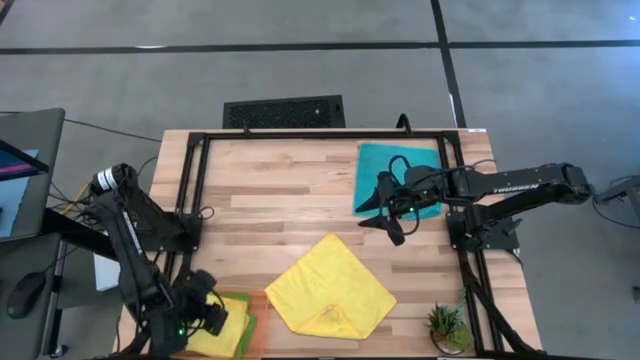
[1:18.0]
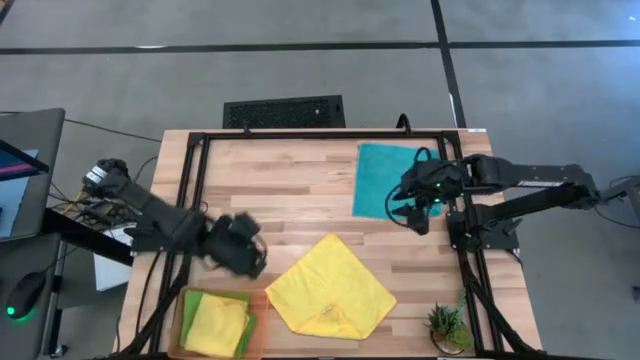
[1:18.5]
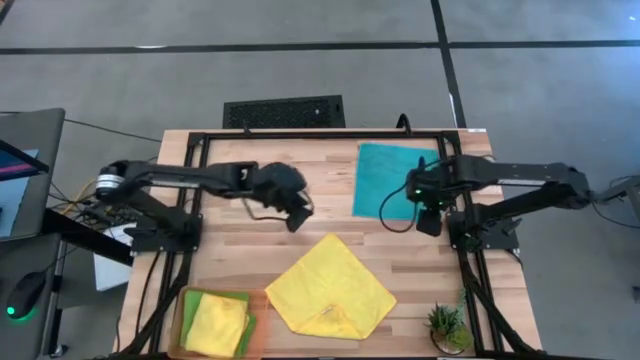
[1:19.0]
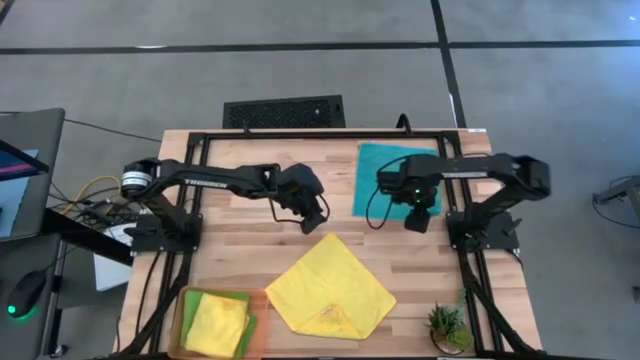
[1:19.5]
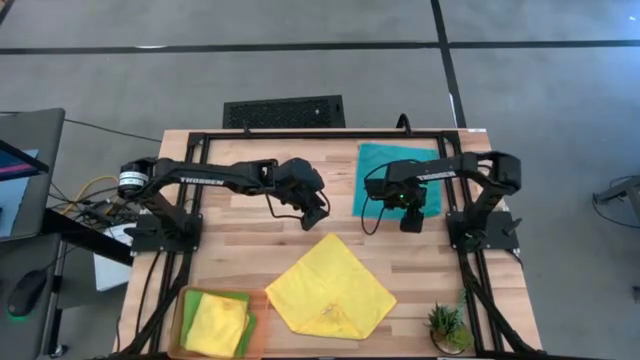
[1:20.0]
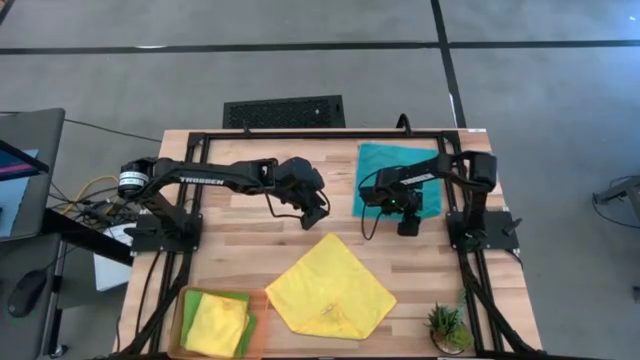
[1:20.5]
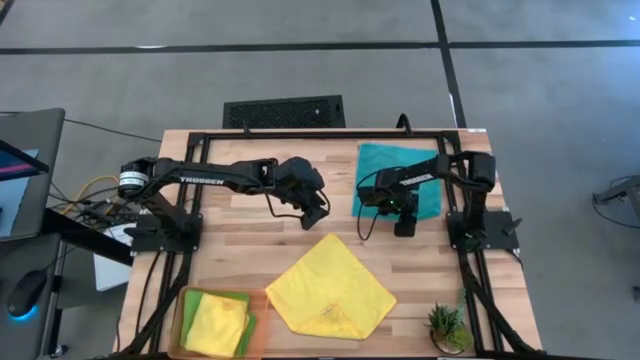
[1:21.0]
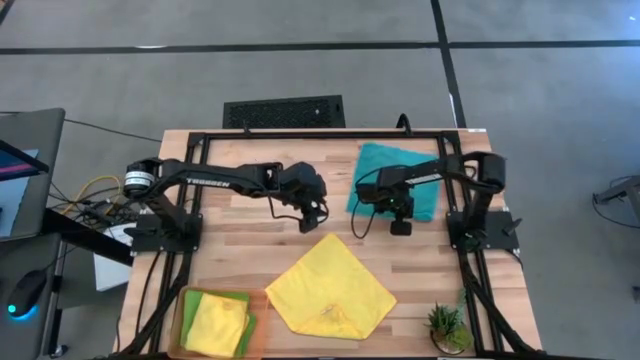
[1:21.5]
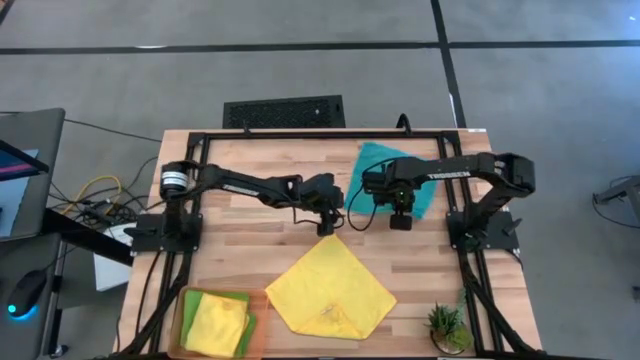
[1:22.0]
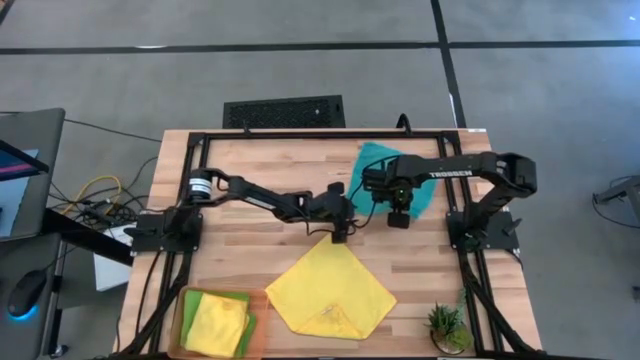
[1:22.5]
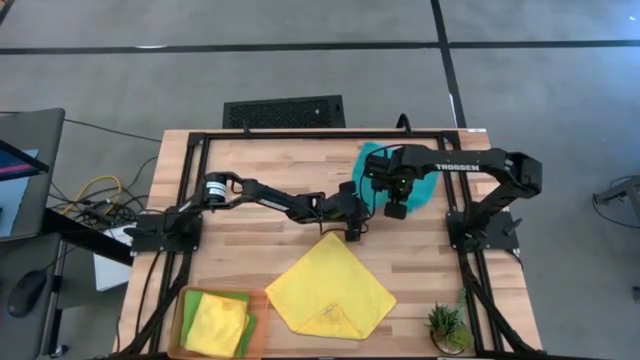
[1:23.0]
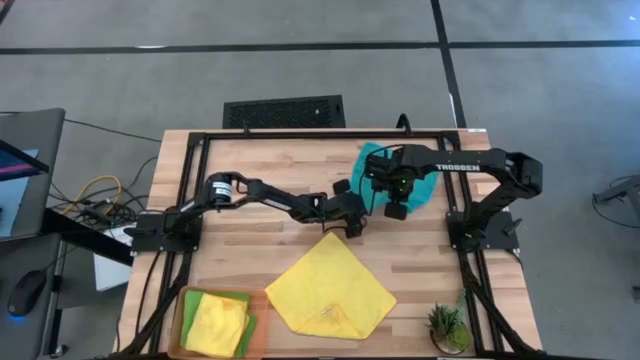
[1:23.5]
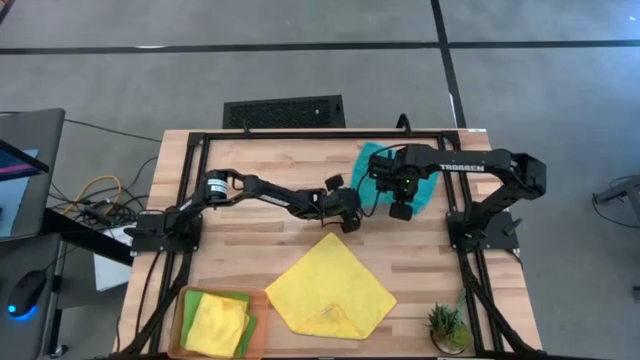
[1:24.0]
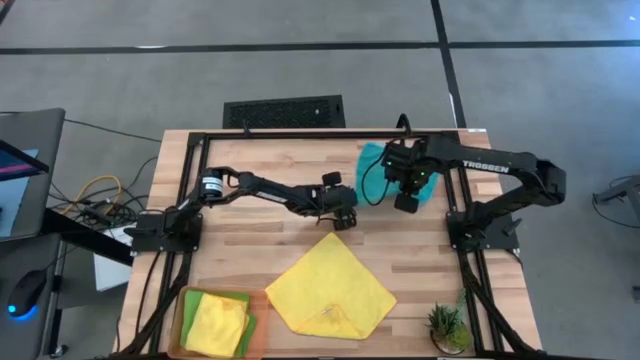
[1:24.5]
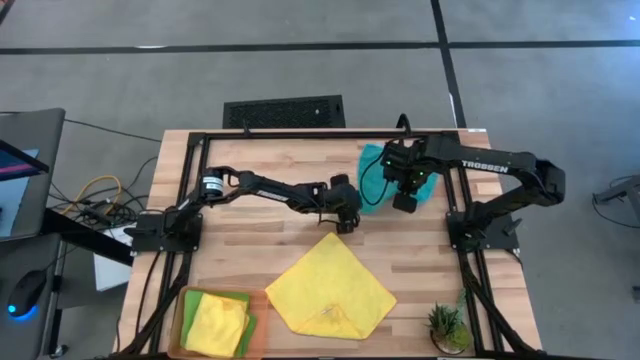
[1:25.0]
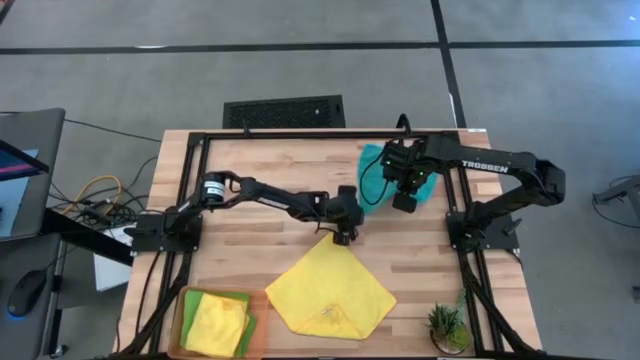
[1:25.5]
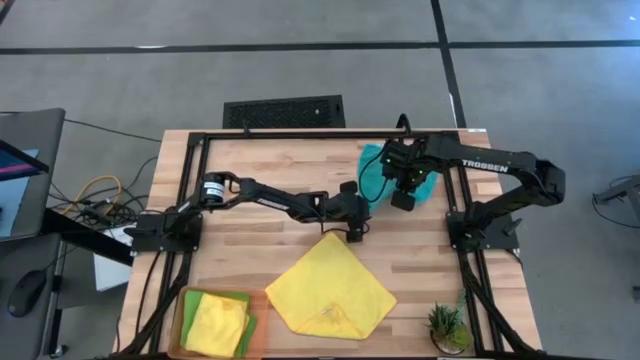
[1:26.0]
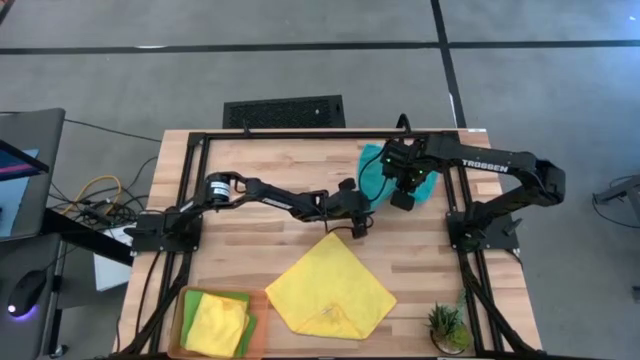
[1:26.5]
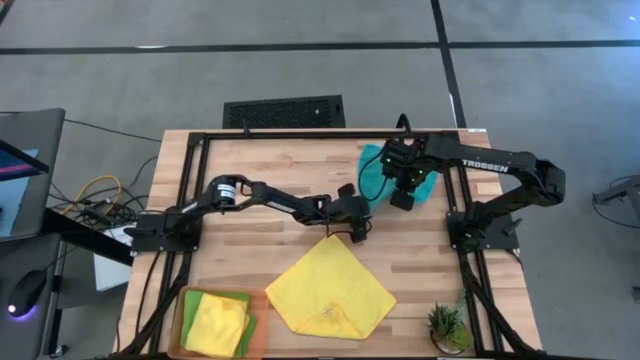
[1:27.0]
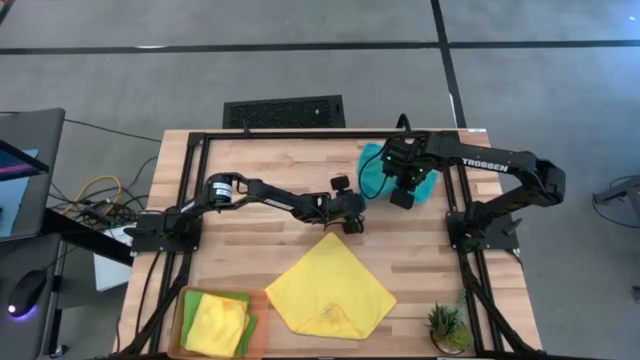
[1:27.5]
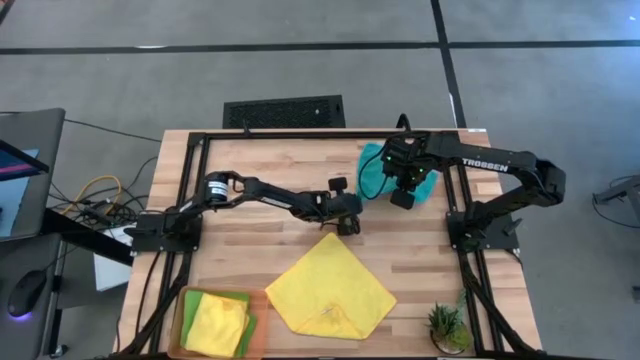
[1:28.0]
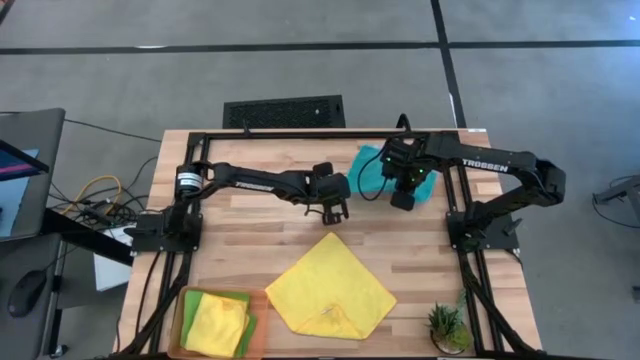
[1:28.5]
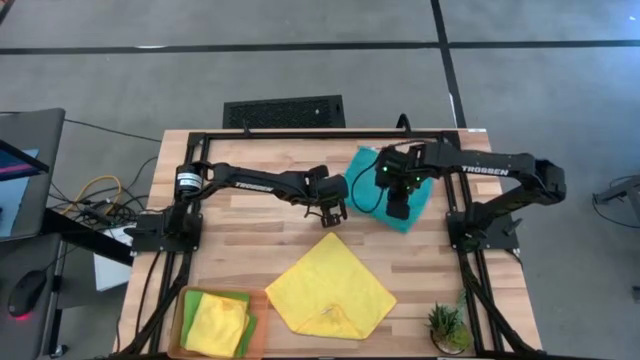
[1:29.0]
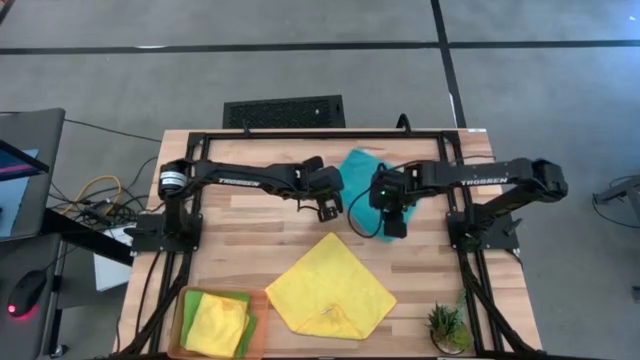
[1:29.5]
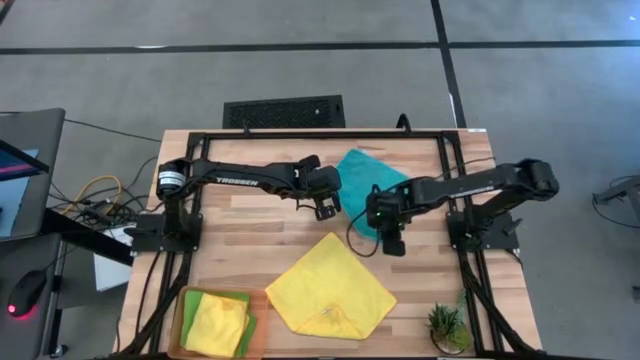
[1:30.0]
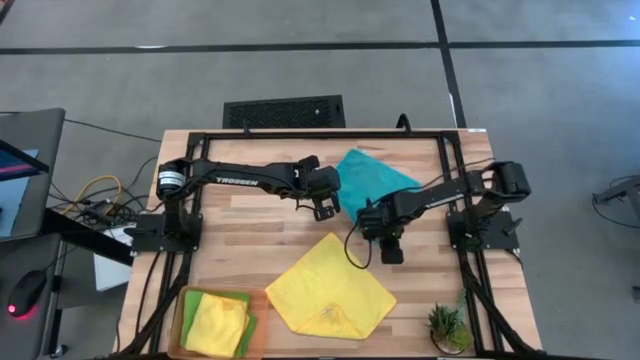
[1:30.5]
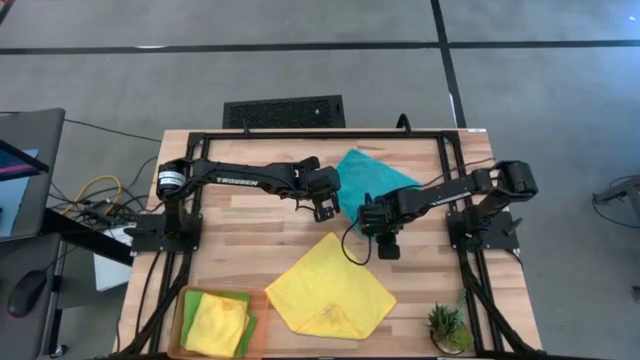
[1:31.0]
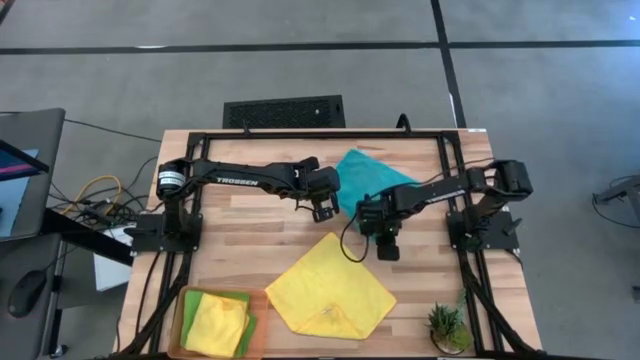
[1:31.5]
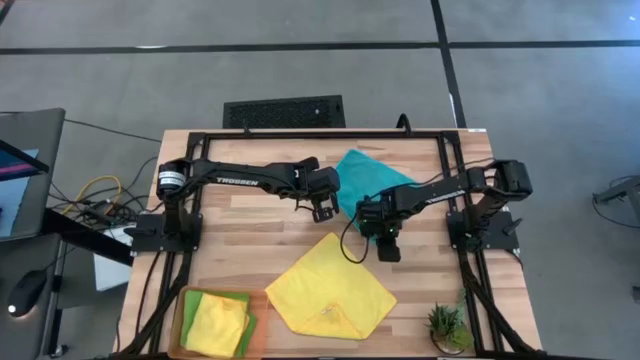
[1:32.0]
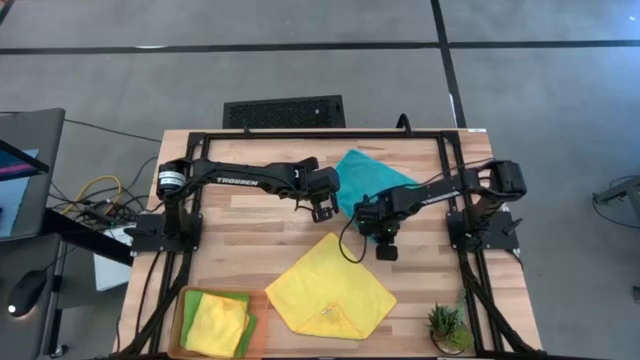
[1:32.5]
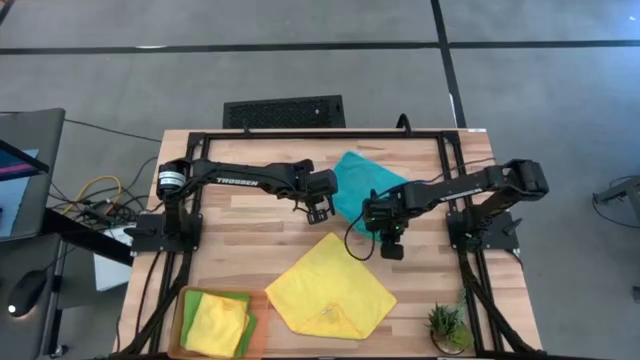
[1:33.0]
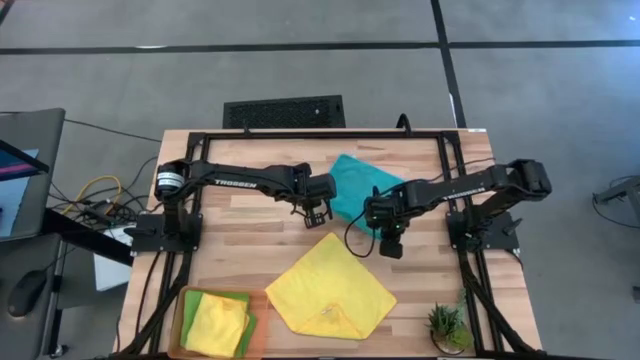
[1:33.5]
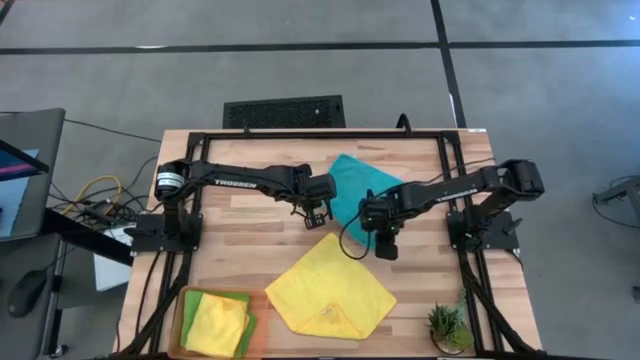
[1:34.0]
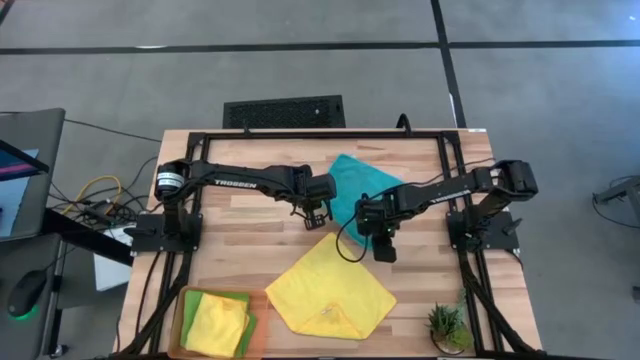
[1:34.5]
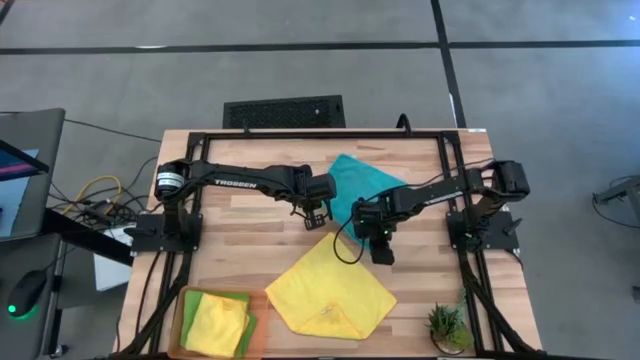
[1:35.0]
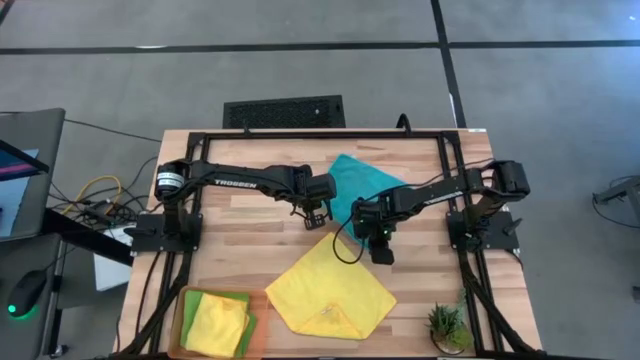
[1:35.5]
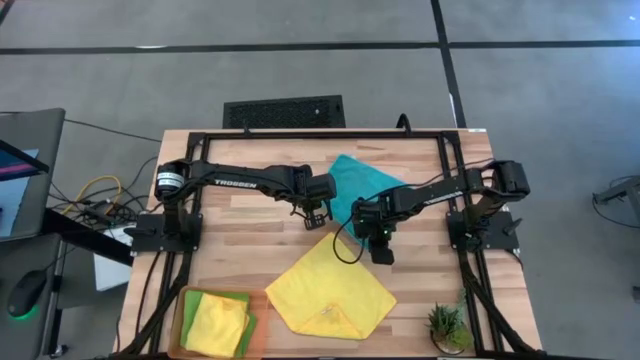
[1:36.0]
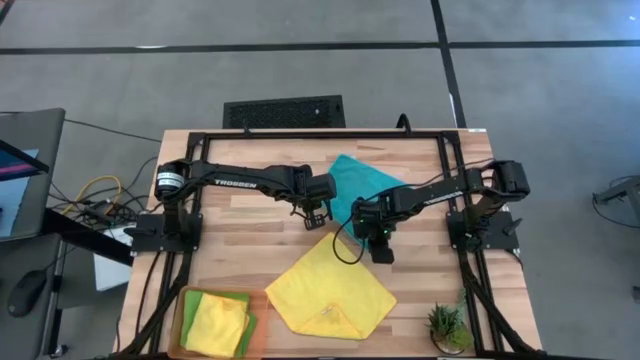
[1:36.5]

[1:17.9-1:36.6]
Task: Fold microfiber towels
Fold the blue microfiber towel

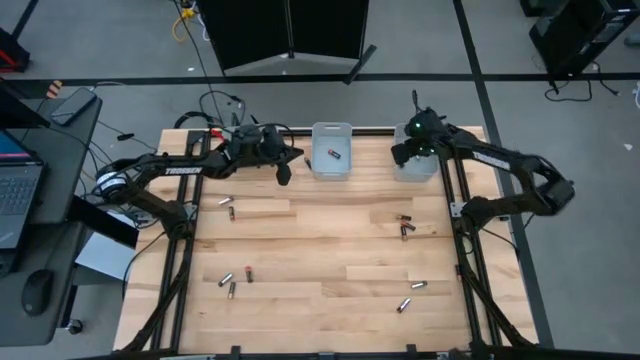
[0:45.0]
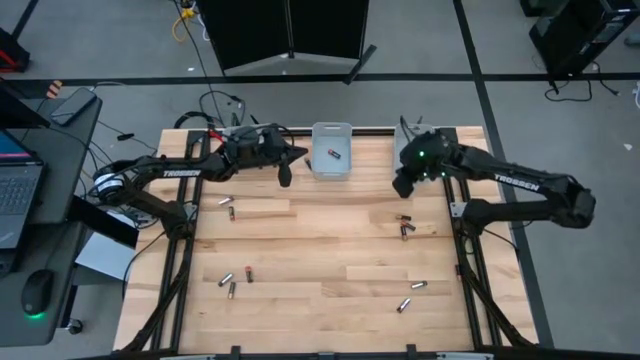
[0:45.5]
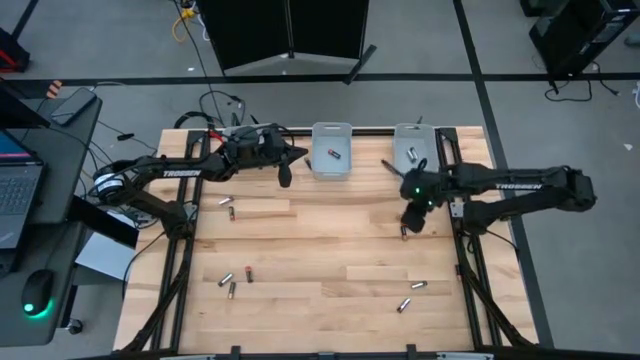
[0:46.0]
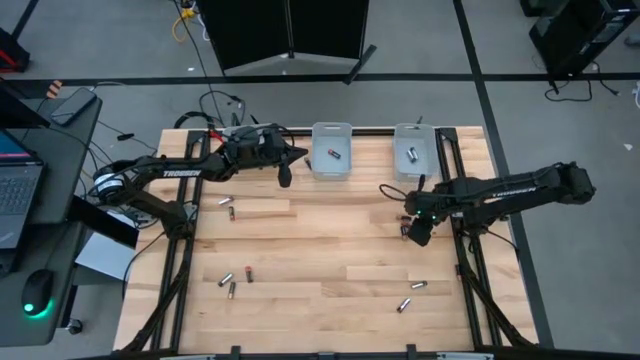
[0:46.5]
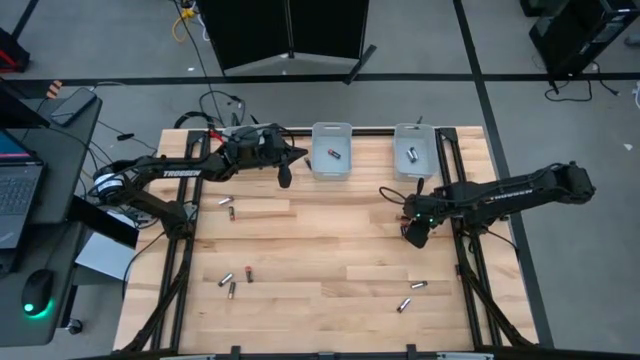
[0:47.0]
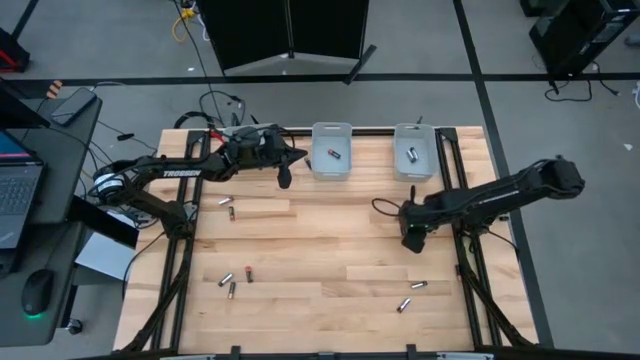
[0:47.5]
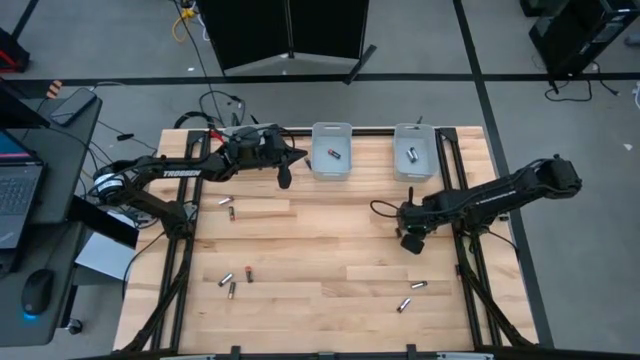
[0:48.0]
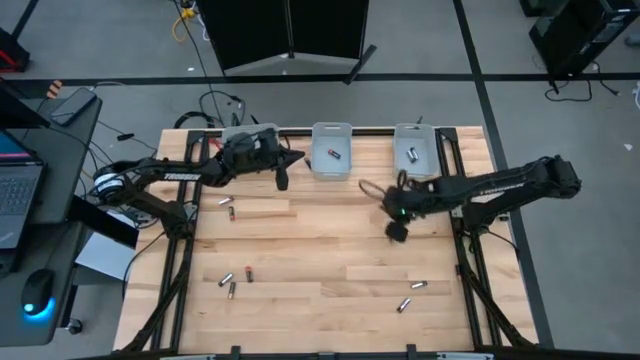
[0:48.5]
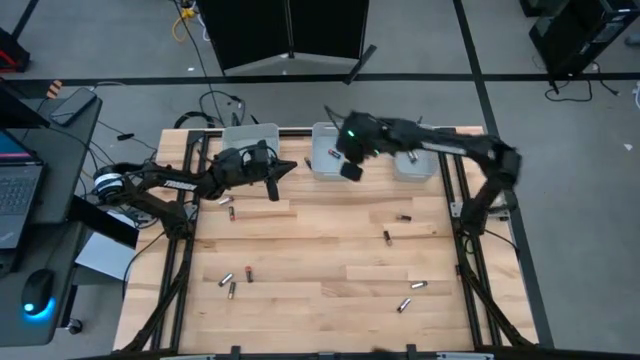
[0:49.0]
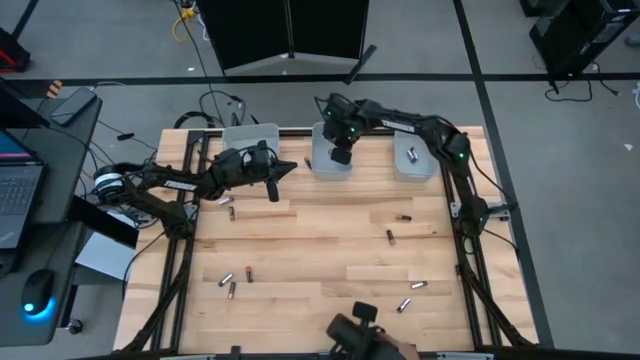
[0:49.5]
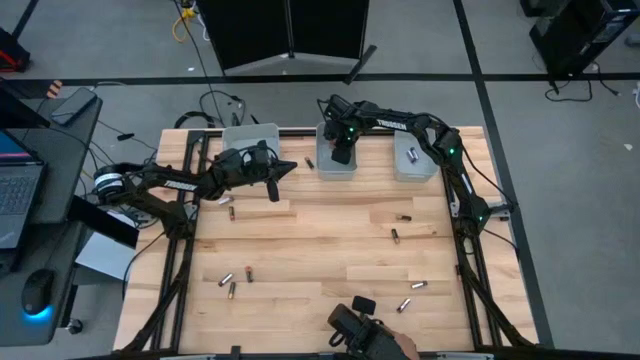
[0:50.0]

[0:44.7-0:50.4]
Task: Sort batteries
Put the top right black orange battery into the middle bin
